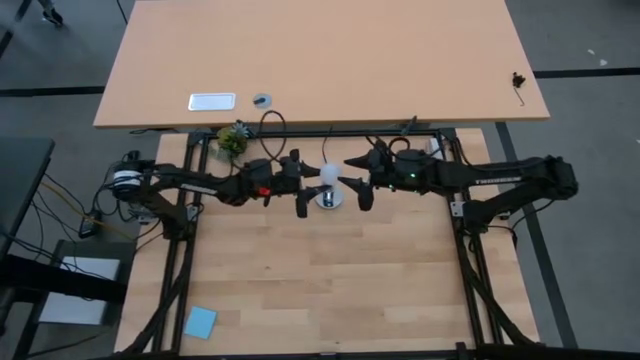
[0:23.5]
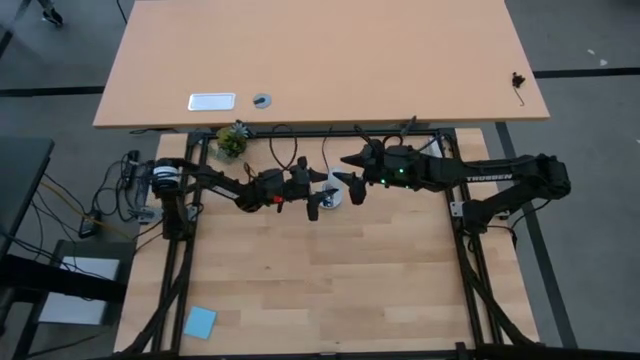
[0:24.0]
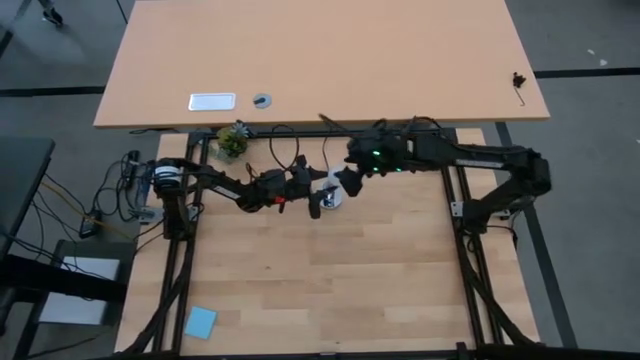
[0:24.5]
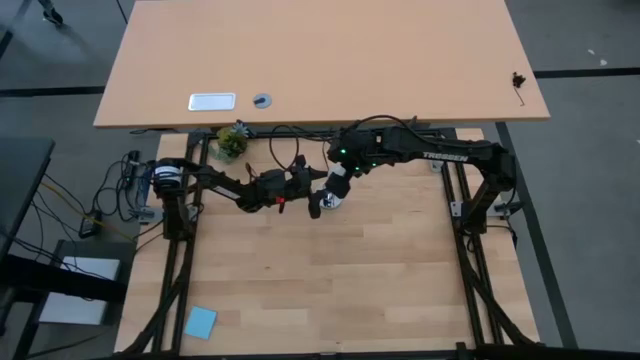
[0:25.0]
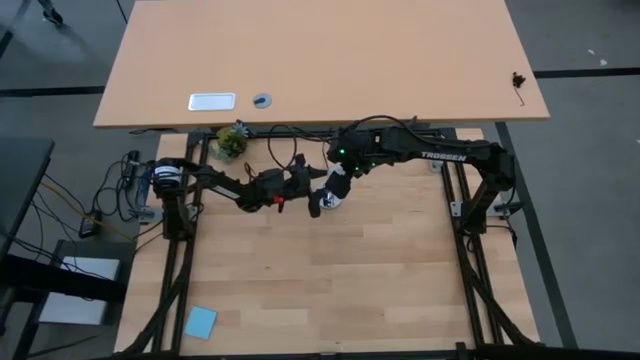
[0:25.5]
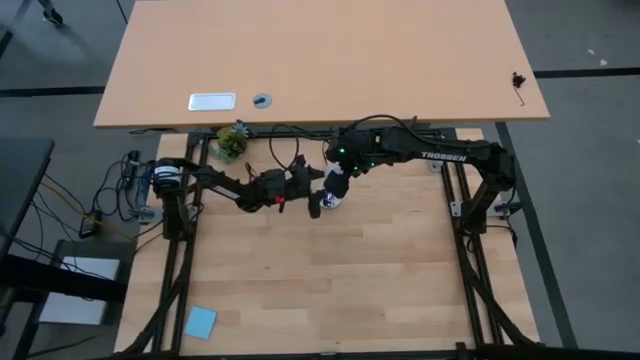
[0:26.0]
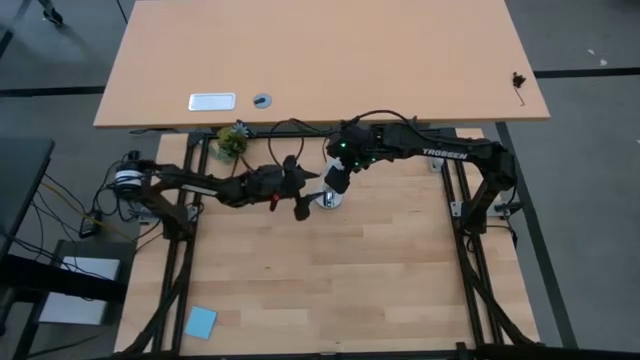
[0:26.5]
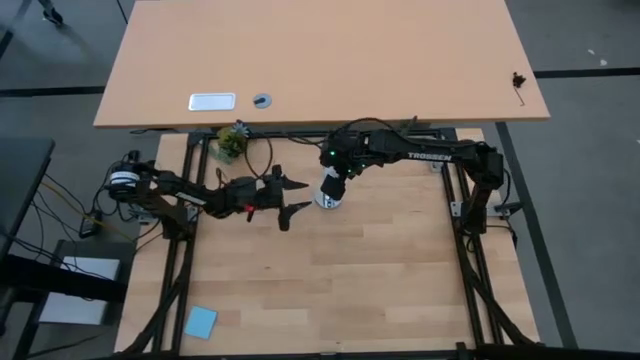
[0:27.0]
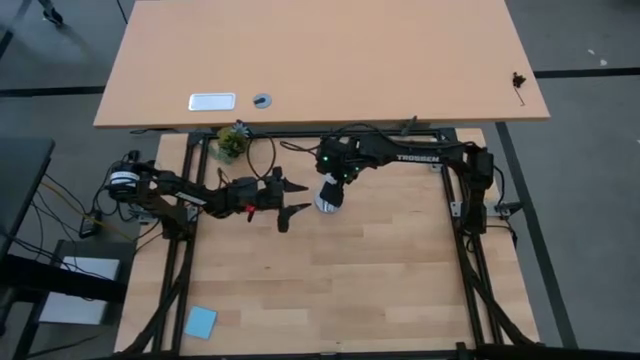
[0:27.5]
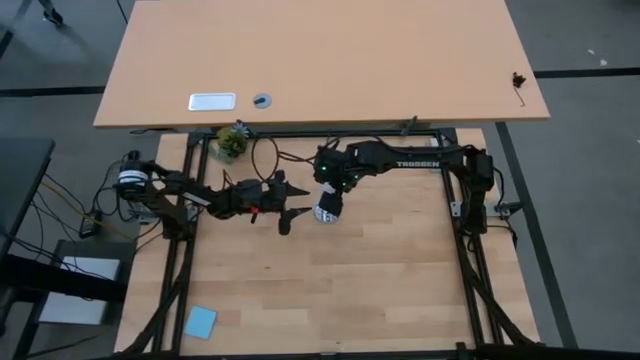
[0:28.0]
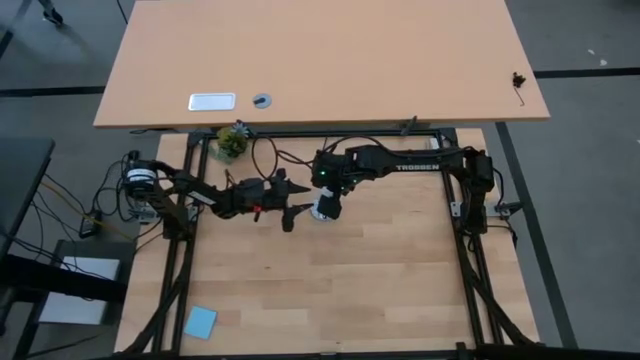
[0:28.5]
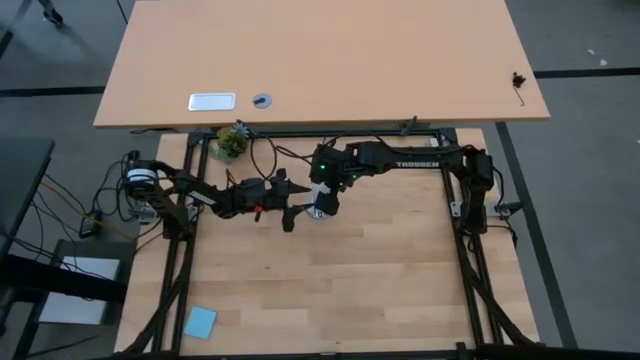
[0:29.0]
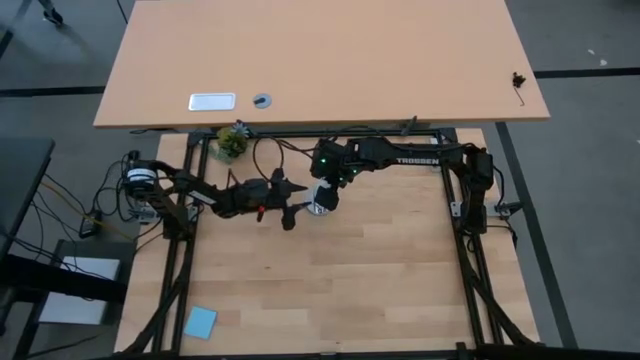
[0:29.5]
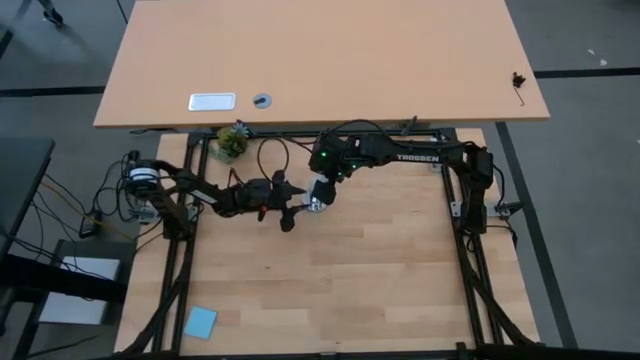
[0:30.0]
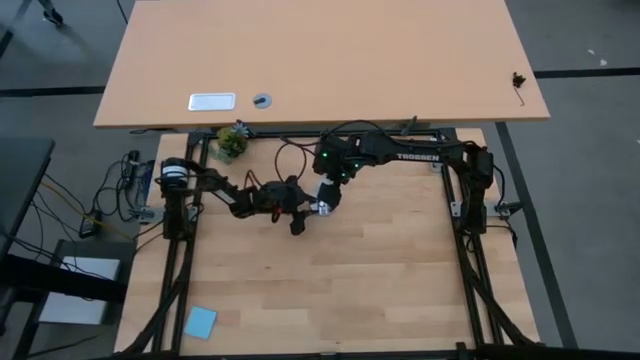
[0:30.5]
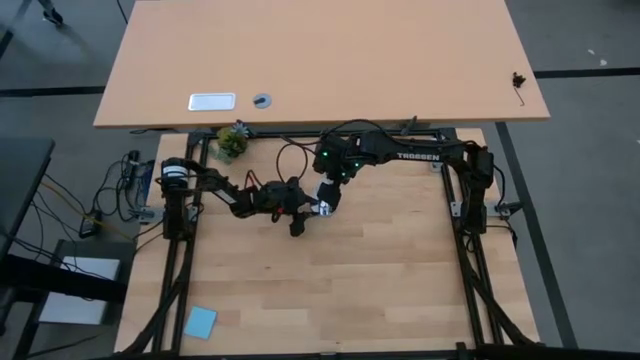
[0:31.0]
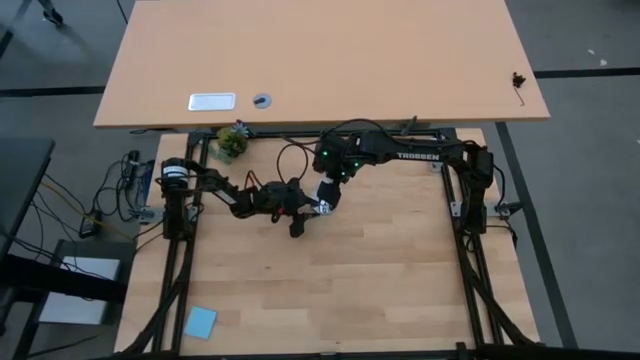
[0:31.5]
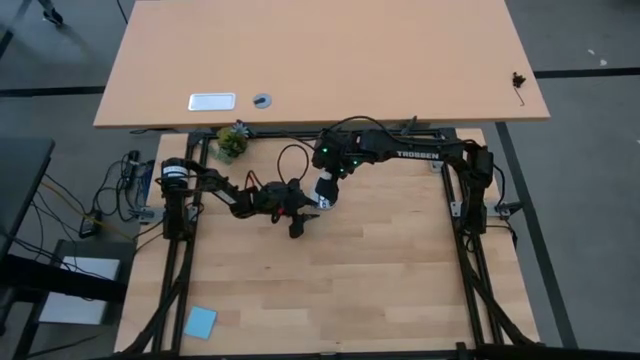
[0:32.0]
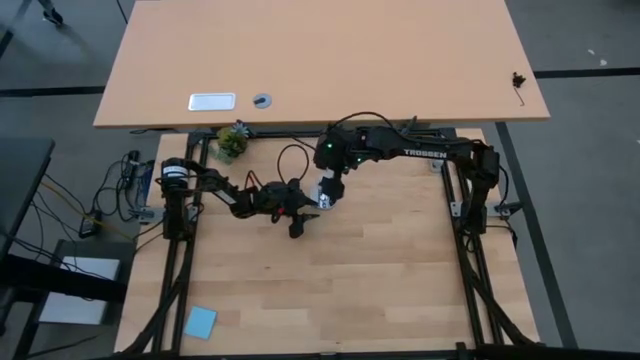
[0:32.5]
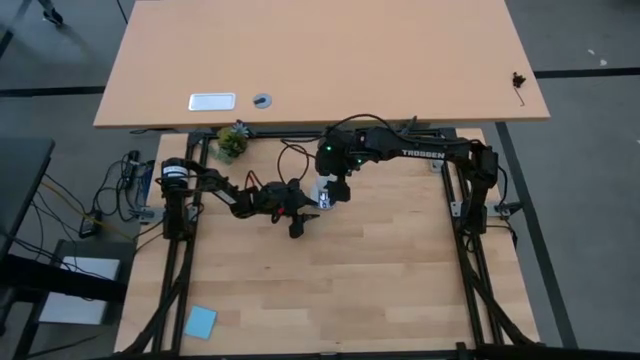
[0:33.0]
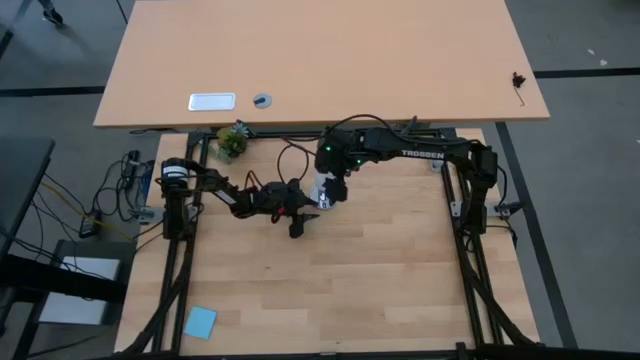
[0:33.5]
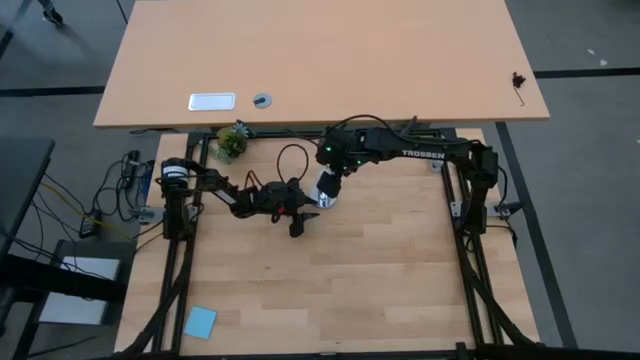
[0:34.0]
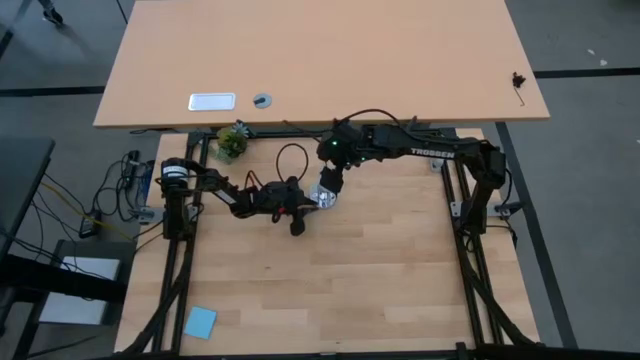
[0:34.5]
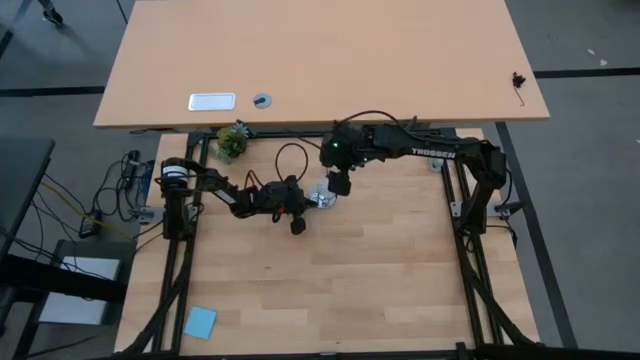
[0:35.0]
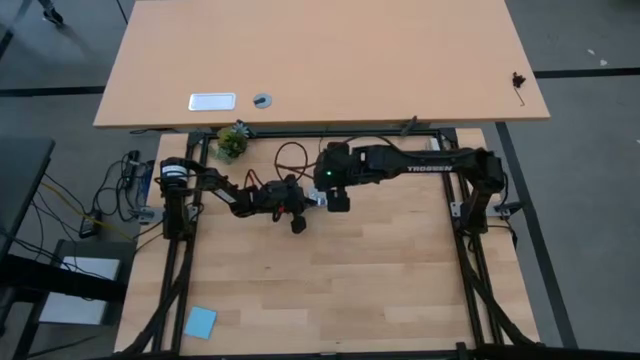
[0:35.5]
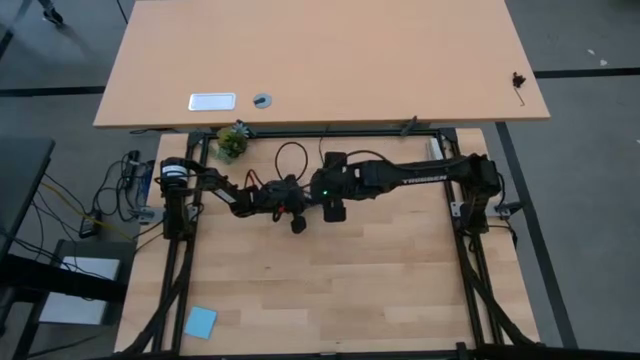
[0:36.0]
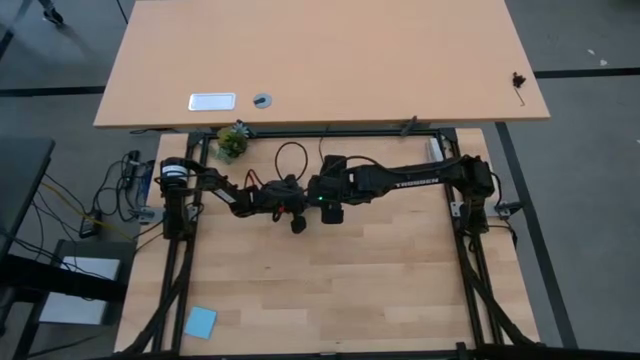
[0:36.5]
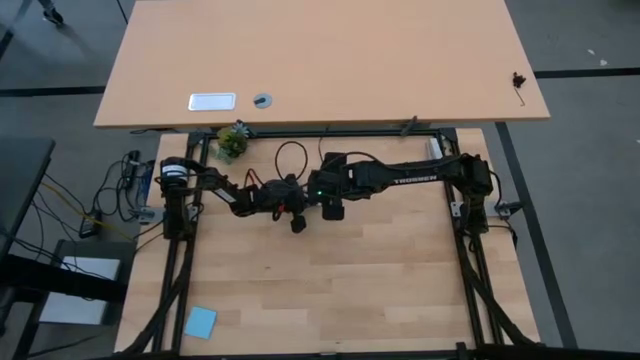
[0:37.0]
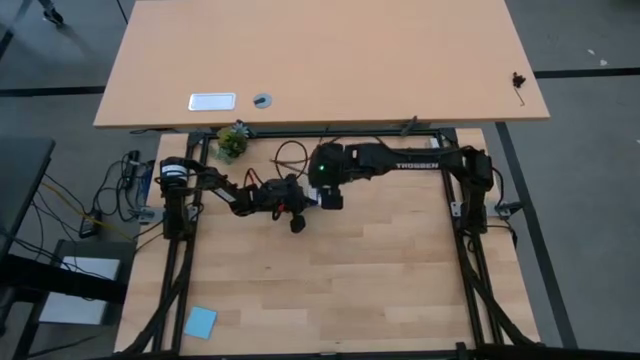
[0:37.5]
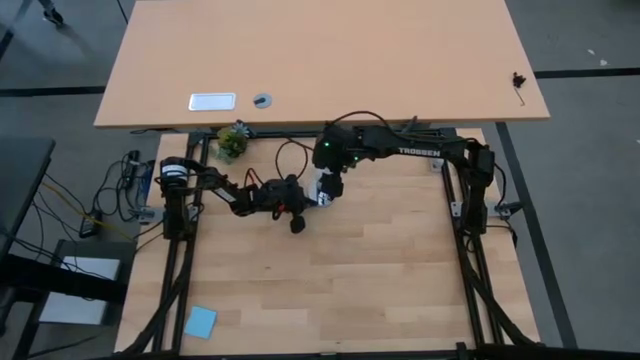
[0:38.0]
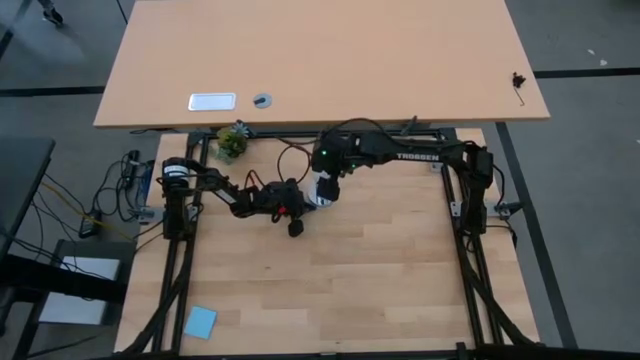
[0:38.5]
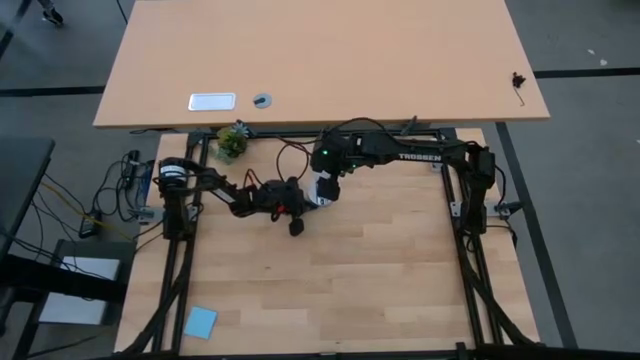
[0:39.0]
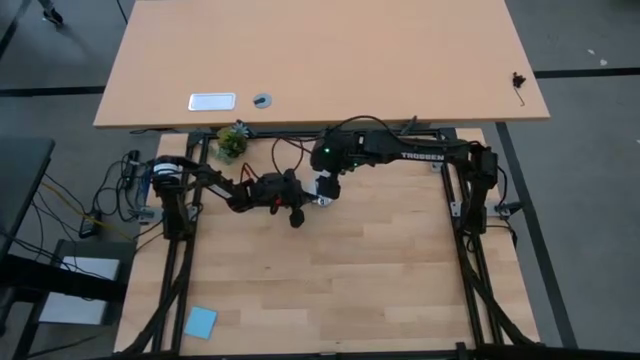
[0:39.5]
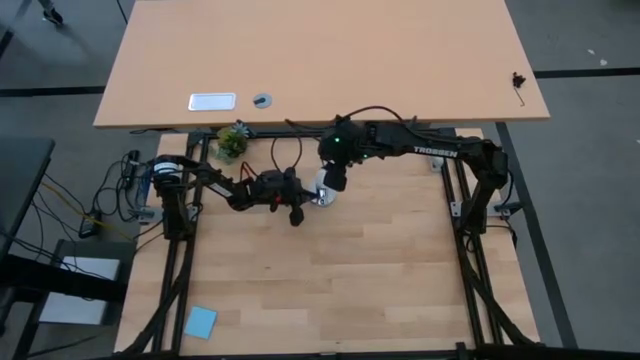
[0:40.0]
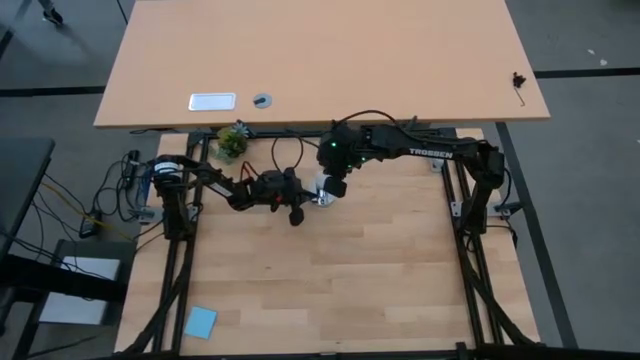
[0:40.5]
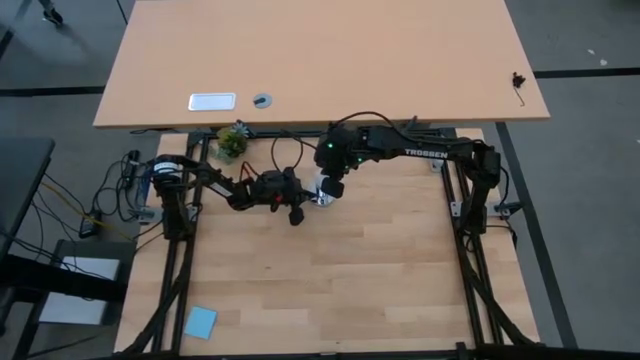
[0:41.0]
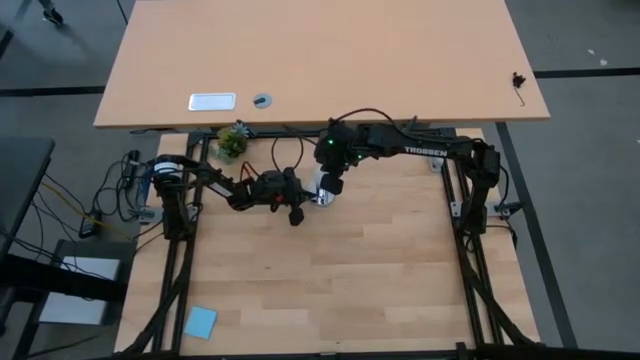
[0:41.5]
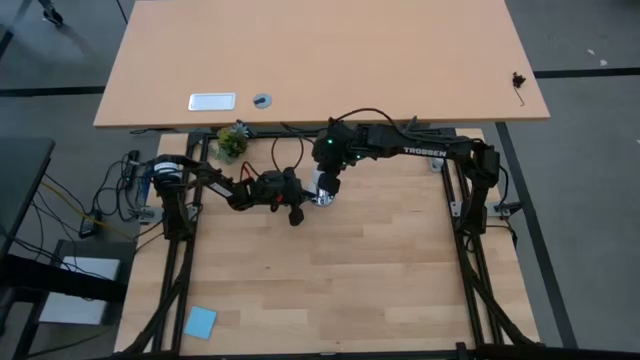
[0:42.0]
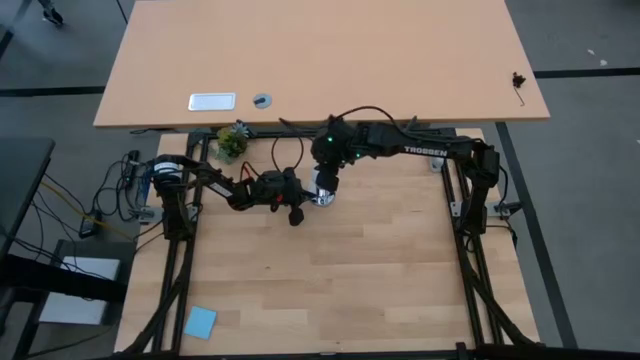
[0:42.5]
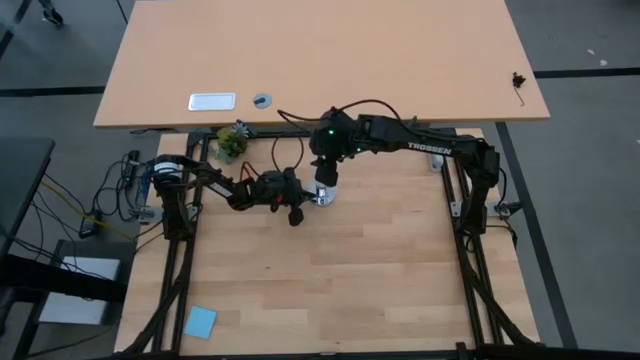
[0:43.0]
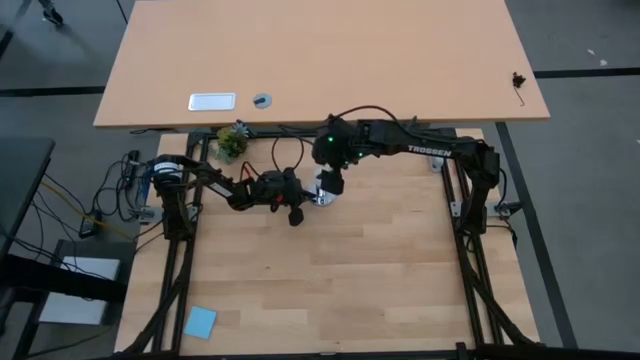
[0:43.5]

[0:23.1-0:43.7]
Task: Screw lightbulb
Insert the lightbulb into the lamp
